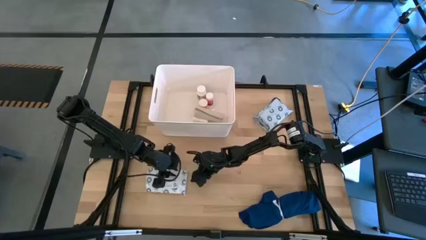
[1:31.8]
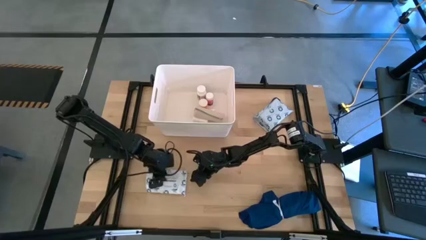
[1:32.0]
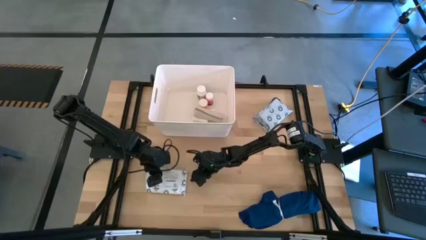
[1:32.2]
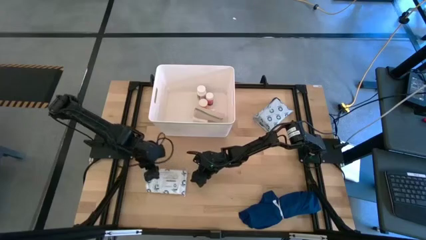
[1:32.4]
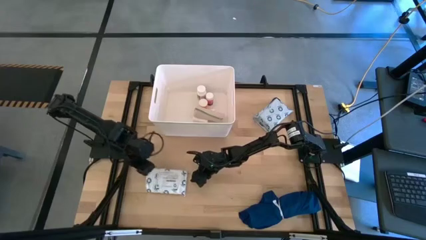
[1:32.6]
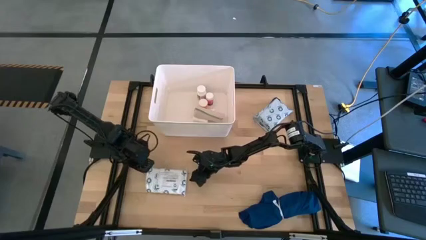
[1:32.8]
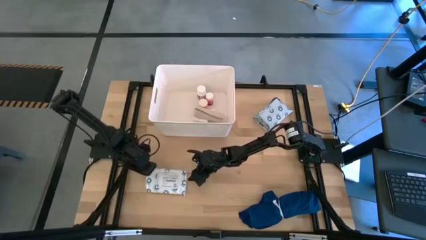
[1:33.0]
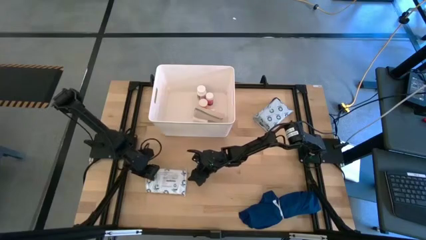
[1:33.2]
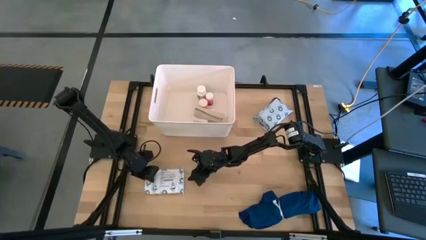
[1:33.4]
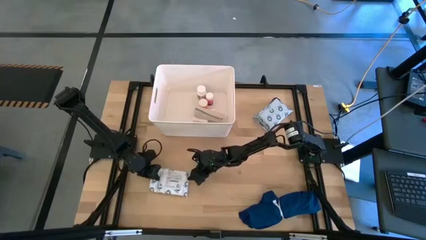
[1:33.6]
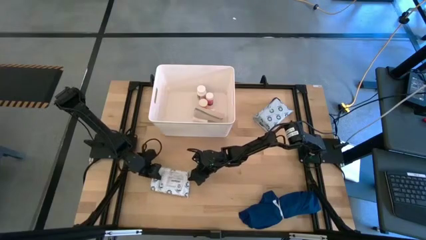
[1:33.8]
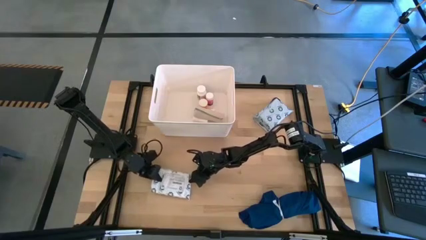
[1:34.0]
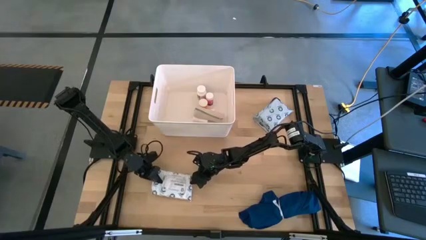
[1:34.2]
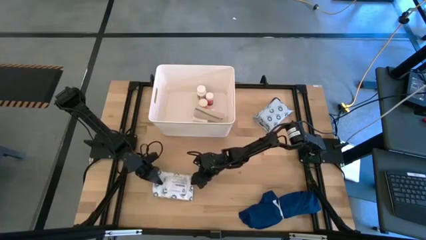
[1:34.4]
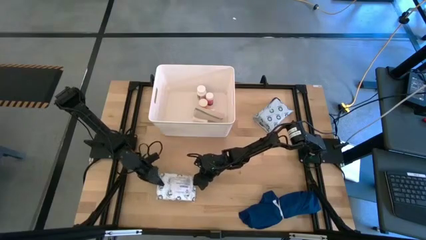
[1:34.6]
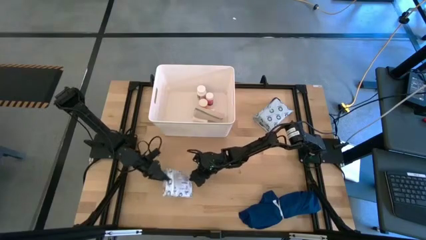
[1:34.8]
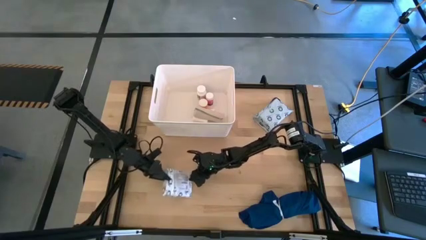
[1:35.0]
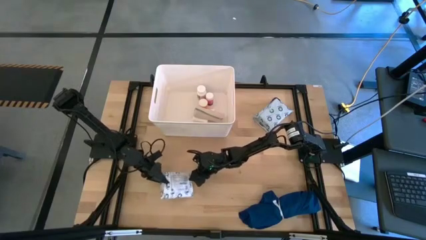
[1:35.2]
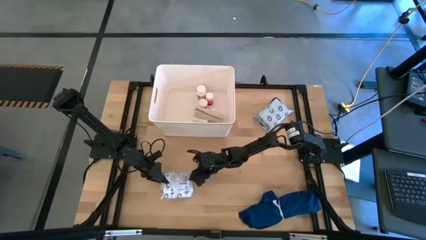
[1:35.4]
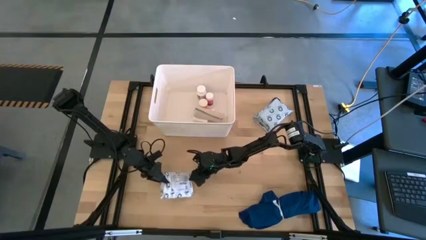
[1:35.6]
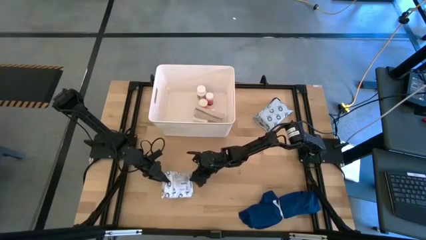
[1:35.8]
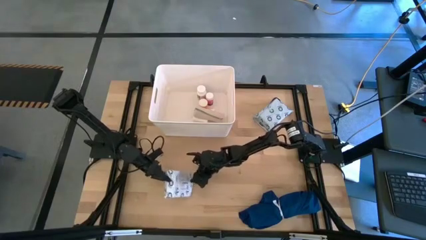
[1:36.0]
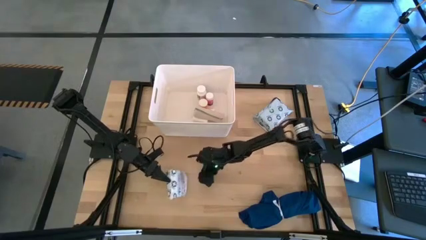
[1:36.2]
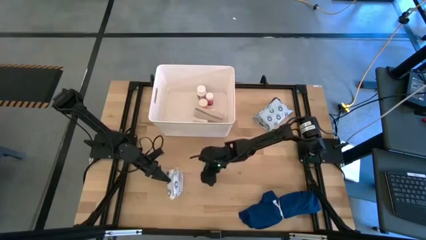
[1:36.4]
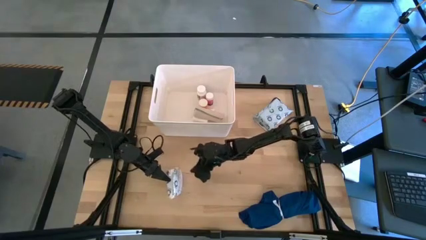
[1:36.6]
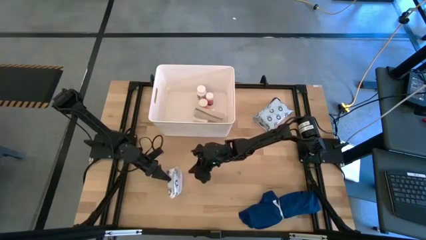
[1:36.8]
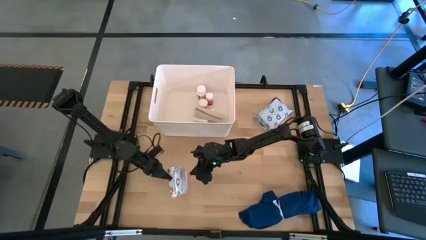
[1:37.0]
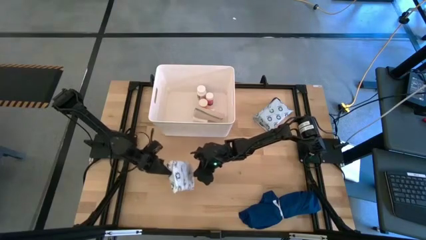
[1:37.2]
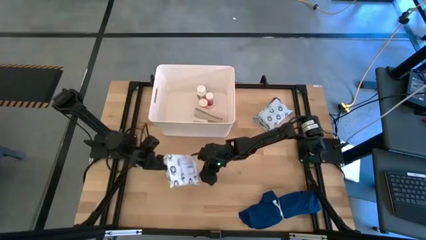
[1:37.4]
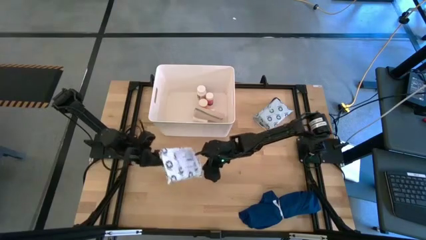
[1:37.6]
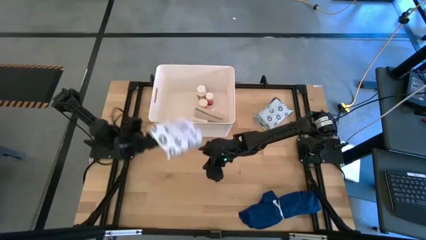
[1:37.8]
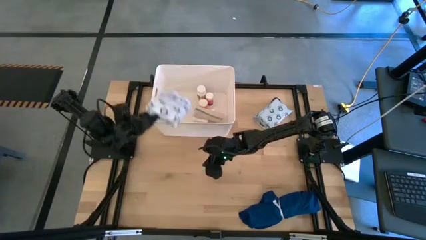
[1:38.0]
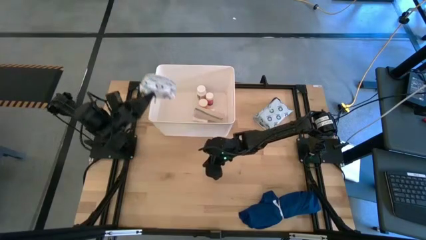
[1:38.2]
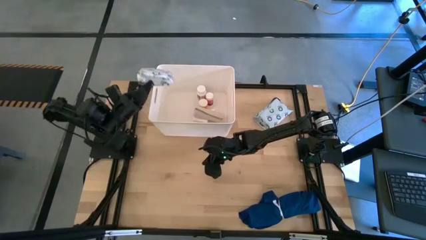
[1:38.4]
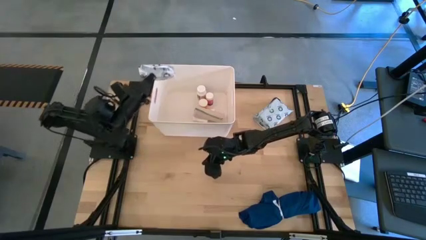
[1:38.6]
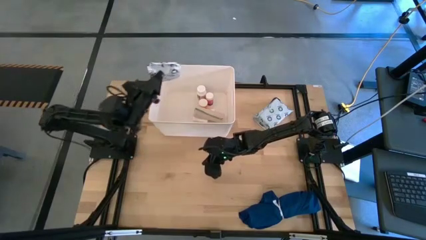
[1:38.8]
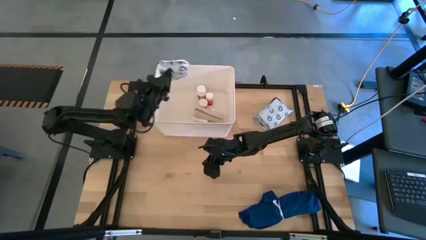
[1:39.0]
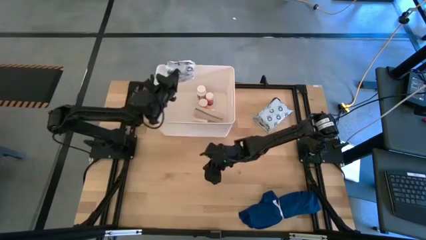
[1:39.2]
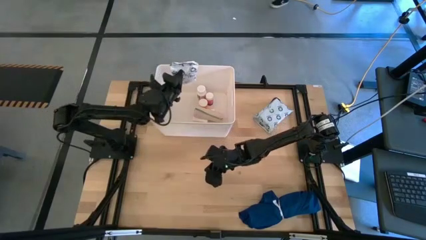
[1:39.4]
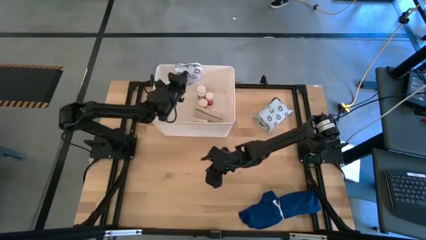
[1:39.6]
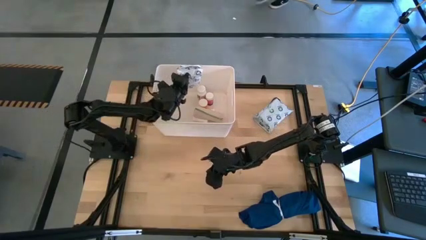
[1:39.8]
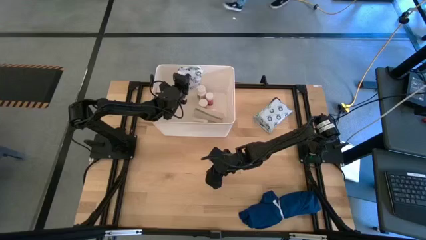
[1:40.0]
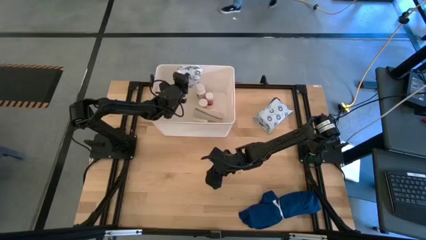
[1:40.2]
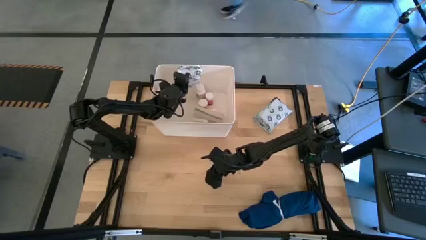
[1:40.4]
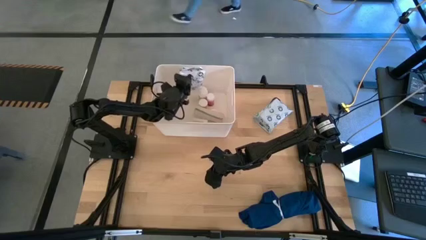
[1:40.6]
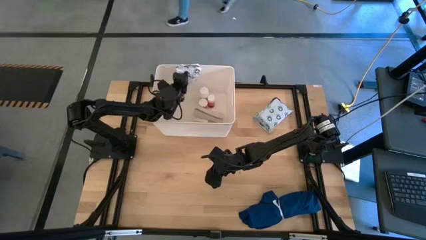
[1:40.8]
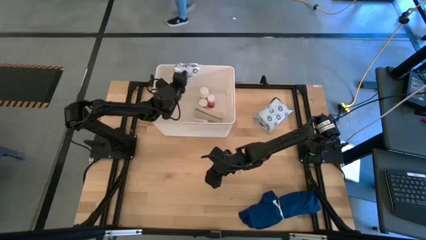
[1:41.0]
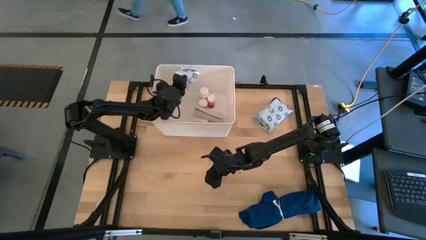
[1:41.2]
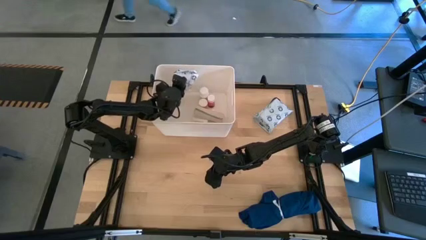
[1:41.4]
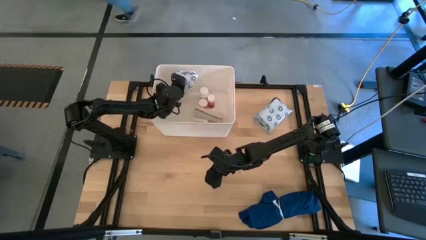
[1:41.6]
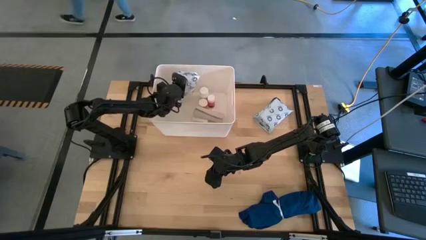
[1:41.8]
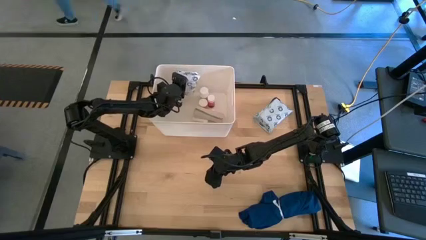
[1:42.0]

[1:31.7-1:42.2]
Task: Pick & place medical supplies in basket/bin
Put the bottom mailer bag into the white bin
